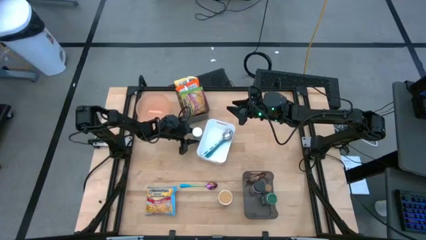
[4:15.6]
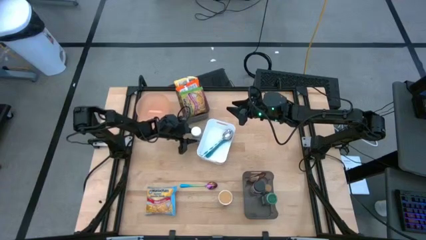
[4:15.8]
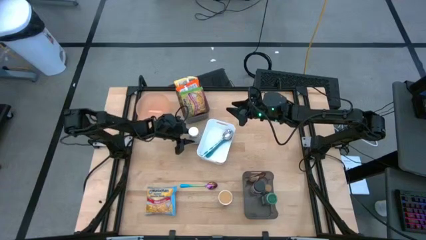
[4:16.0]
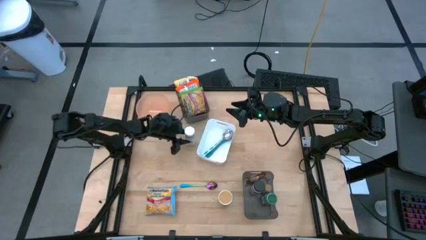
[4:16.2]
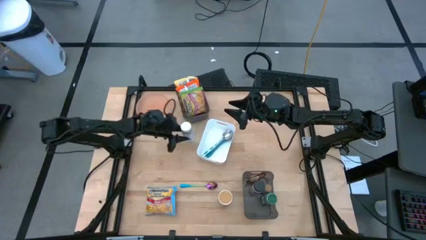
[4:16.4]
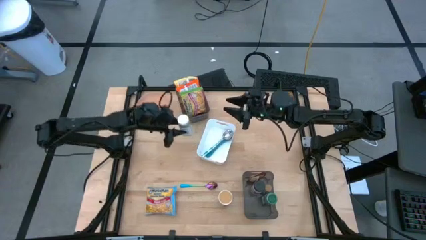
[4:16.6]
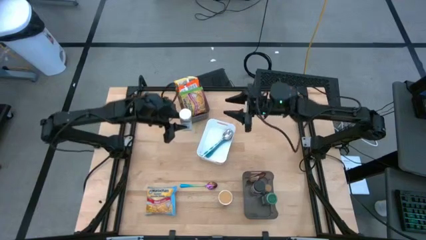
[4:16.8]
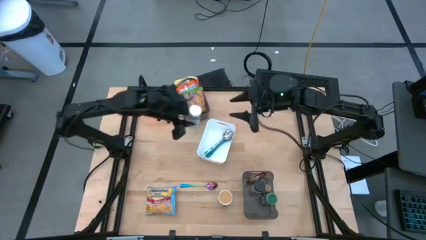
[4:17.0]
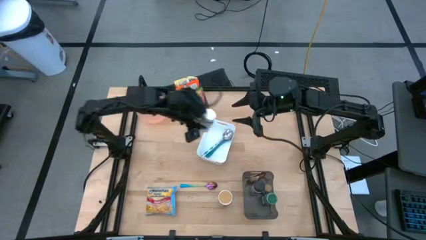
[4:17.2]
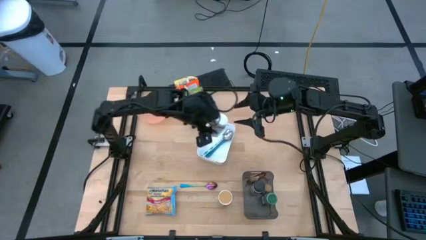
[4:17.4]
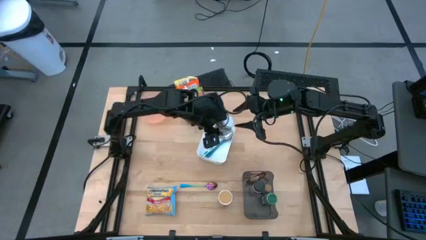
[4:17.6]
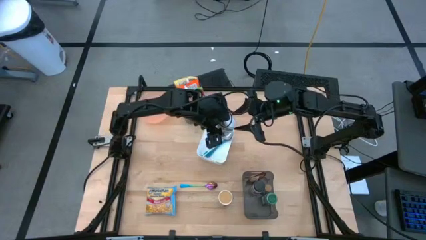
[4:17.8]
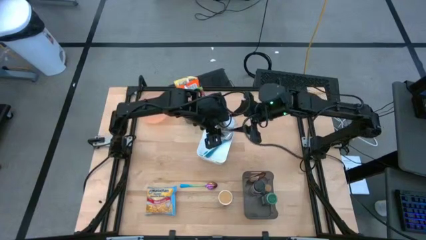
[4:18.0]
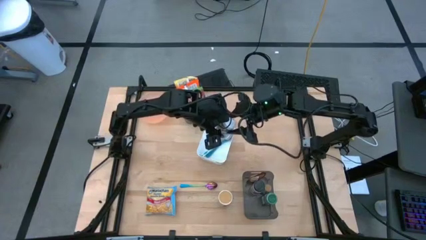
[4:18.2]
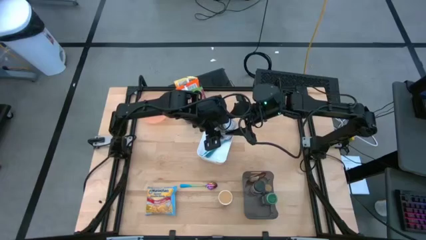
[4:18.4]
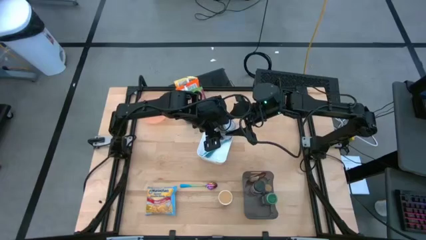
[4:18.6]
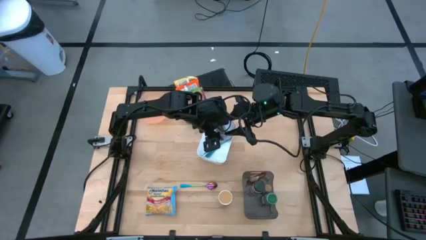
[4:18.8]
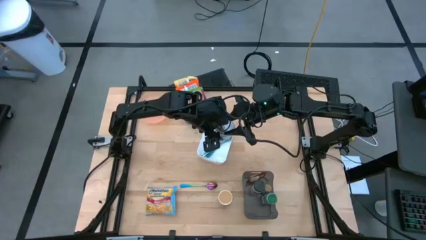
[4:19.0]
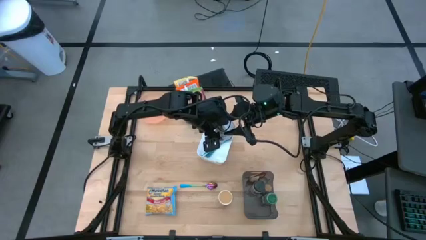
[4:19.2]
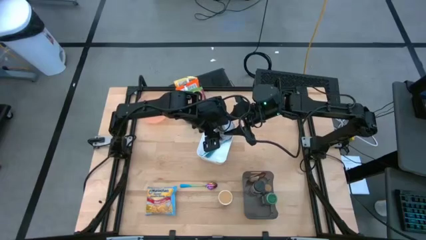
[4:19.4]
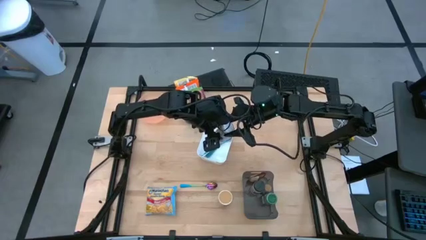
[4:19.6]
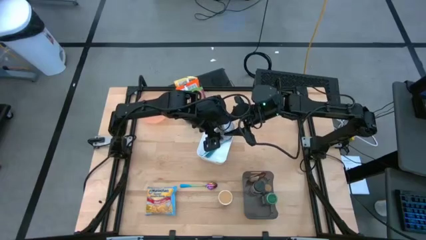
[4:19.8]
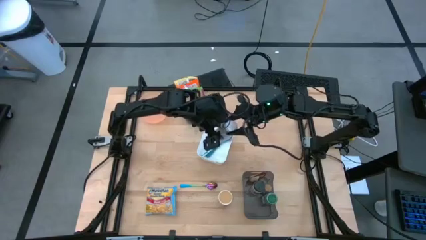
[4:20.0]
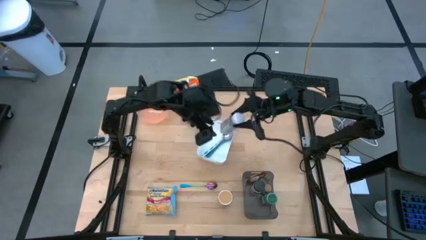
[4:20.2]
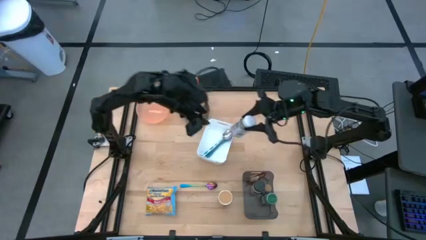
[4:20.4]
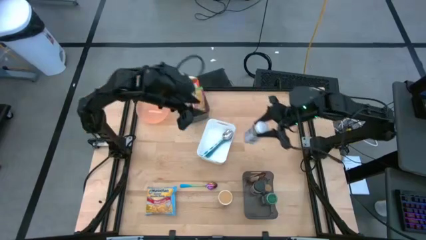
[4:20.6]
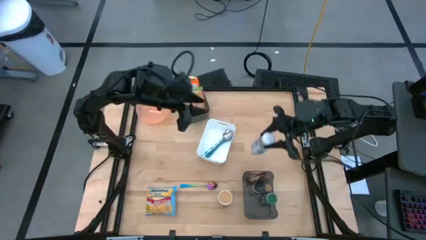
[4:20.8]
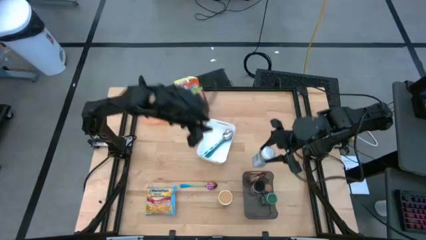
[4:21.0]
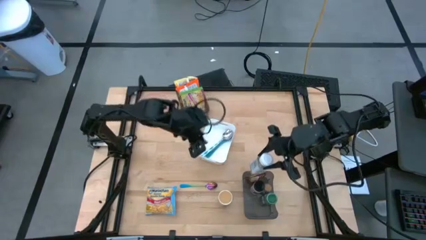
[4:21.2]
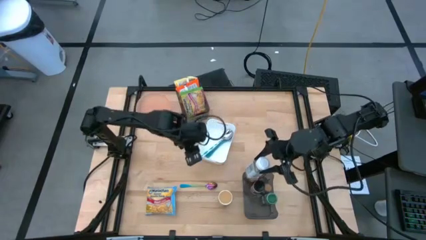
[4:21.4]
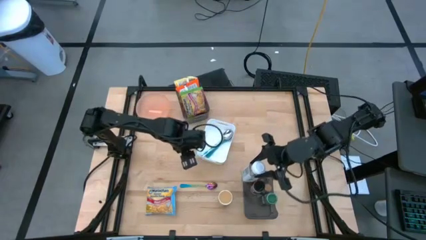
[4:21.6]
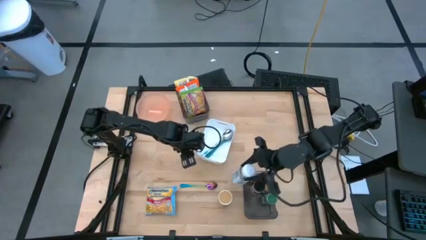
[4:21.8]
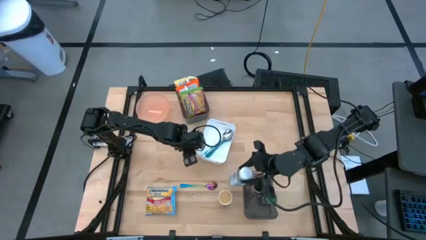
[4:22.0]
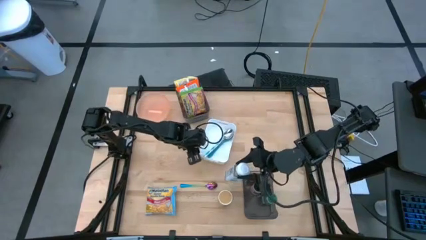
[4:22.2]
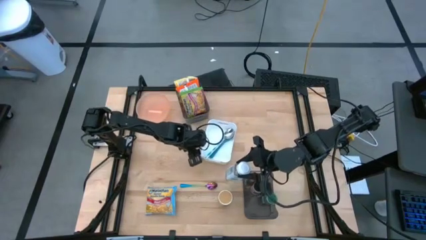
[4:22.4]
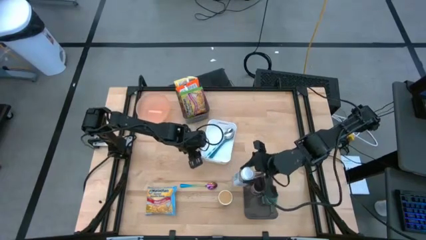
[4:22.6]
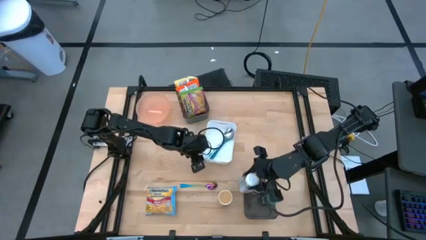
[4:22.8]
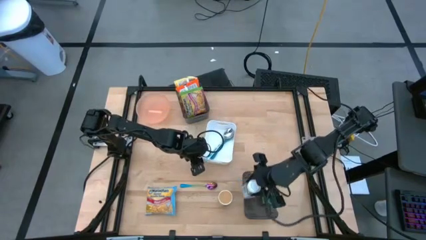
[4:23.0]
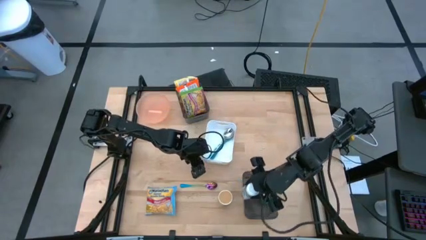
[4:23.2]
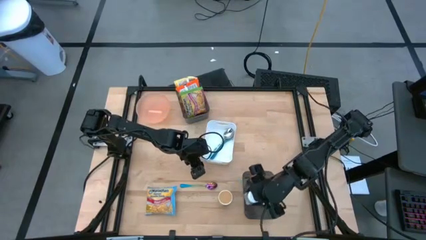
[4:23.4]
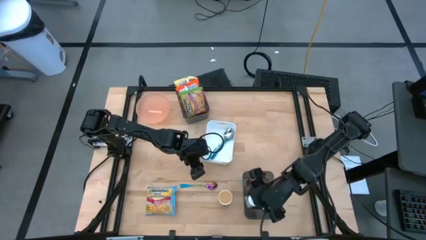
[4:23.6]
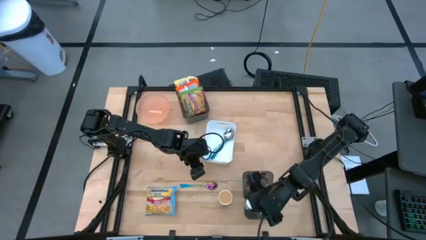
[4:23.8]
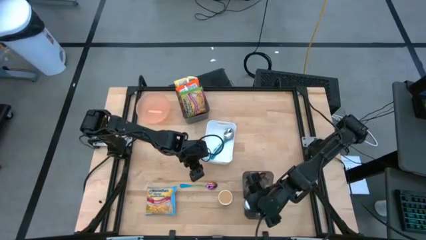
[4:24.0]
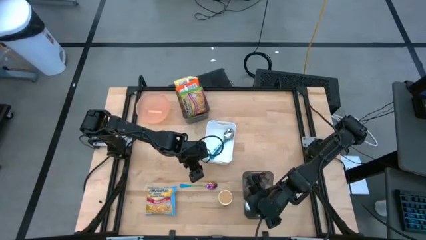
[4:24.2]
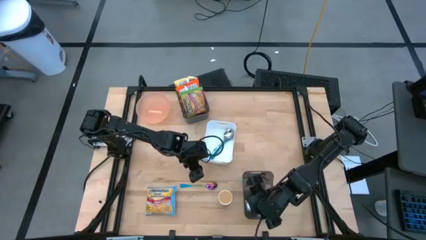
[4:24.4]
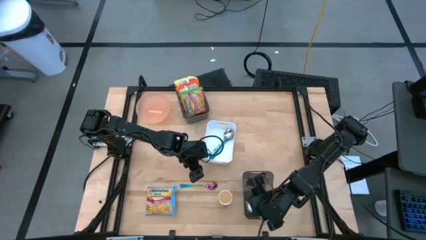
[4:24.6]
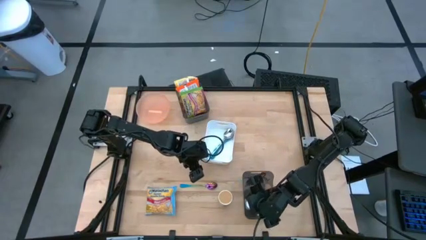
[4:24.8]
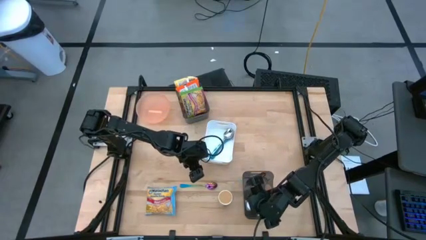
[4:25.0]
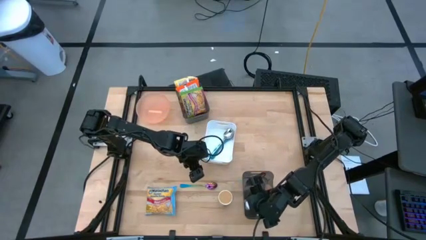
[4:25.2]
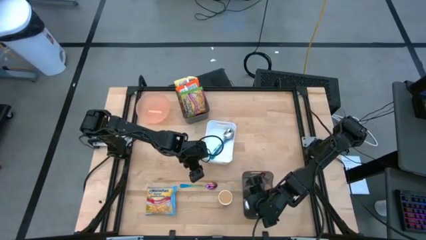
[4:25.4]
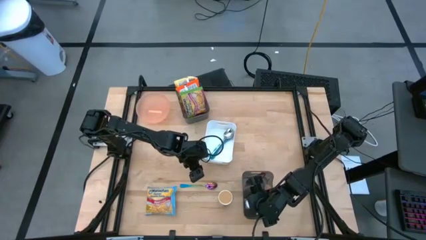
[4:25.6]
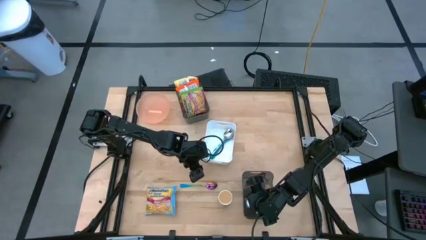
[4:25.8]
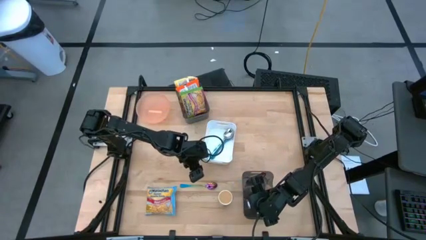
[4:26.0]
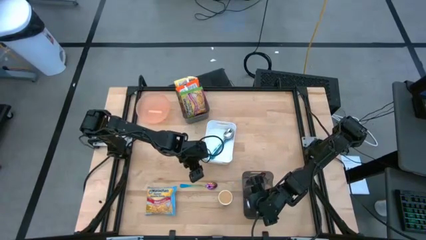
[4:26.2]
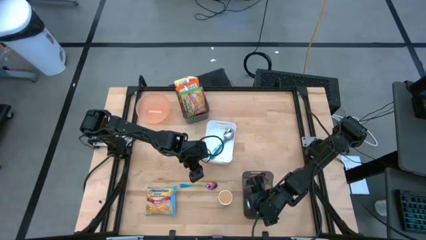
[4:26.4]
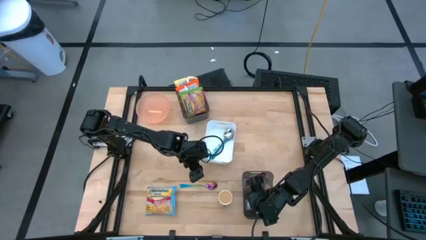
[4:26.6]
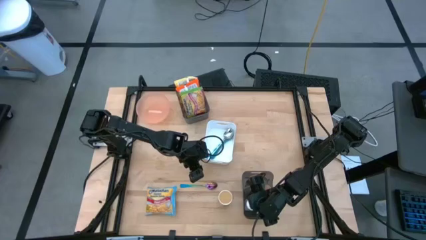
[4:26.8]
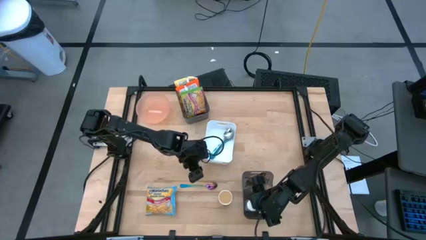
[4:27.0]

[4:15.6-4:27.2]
Task: Pick & Place Food Item
Put the white seasoning bottle into the bottom black bin

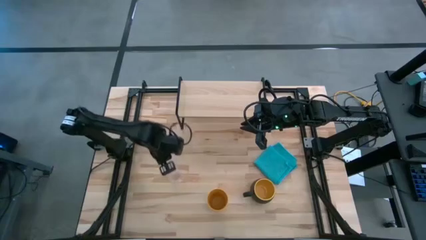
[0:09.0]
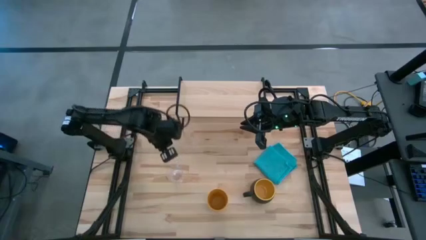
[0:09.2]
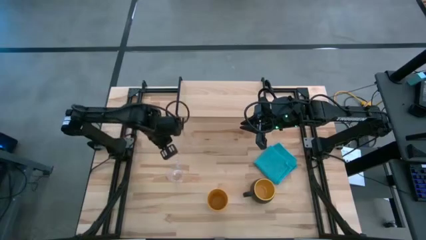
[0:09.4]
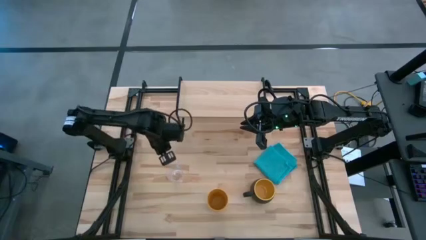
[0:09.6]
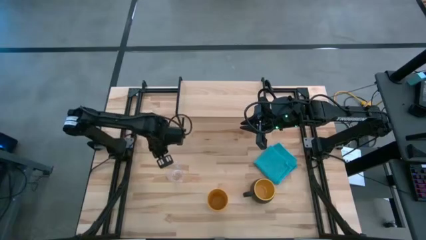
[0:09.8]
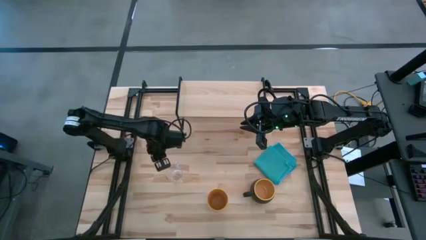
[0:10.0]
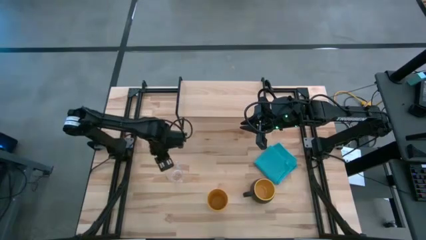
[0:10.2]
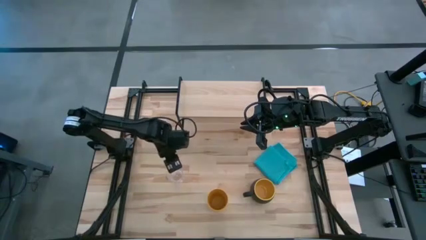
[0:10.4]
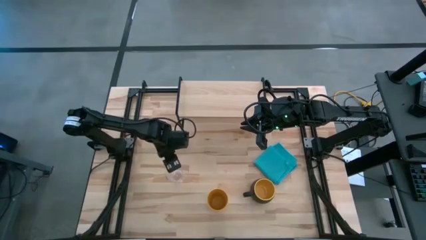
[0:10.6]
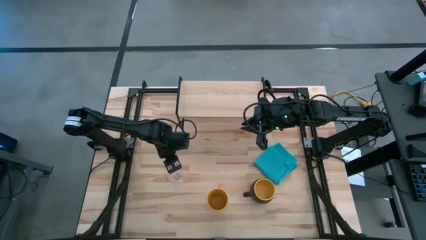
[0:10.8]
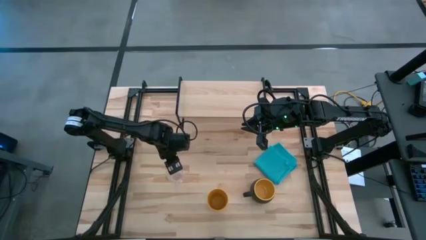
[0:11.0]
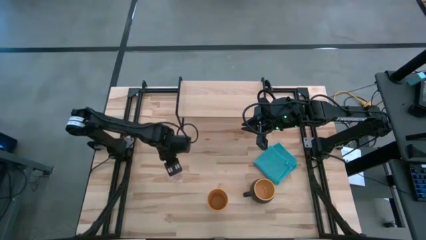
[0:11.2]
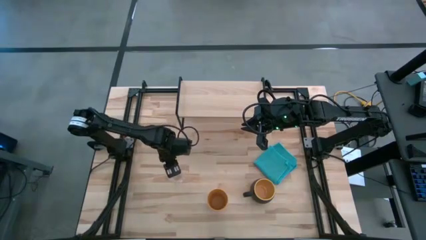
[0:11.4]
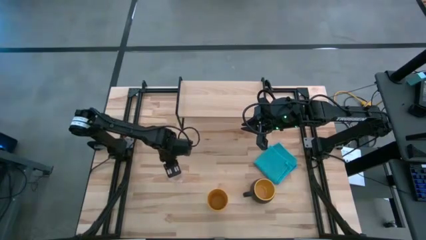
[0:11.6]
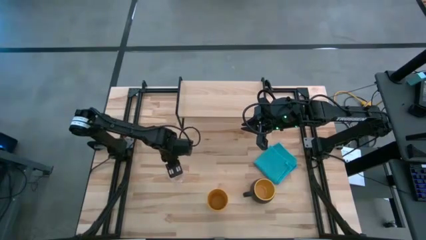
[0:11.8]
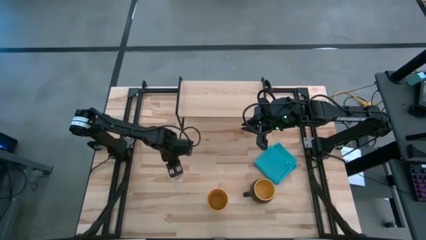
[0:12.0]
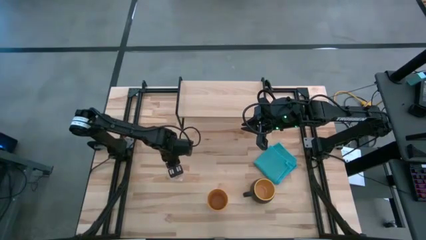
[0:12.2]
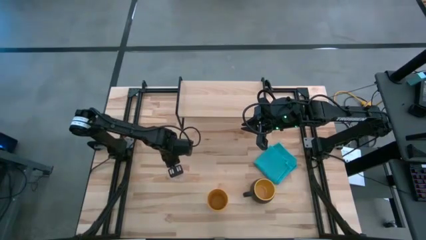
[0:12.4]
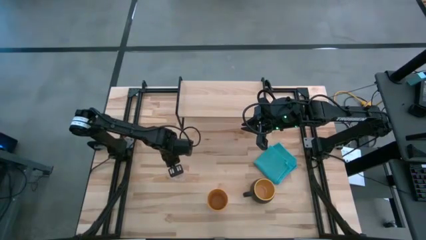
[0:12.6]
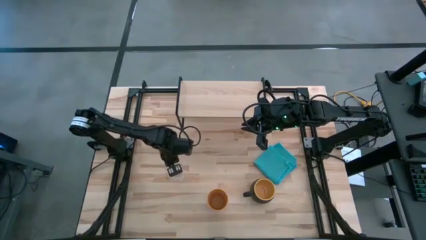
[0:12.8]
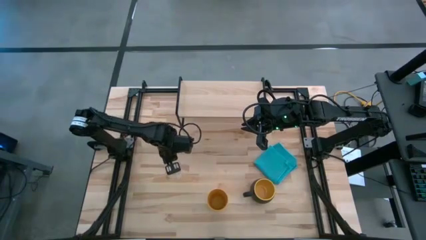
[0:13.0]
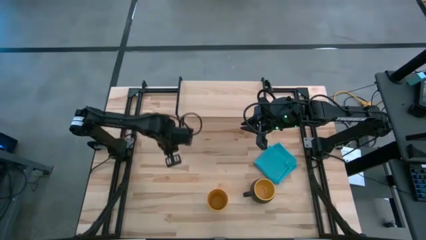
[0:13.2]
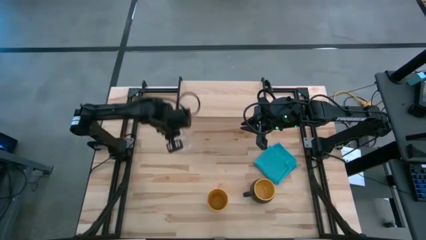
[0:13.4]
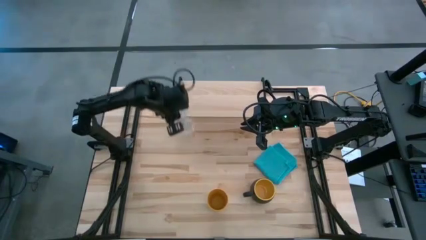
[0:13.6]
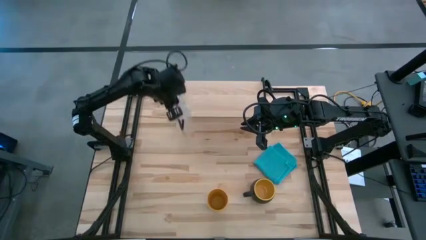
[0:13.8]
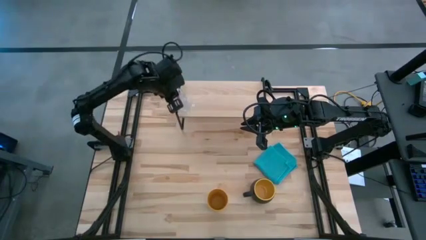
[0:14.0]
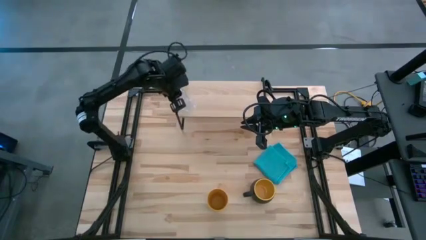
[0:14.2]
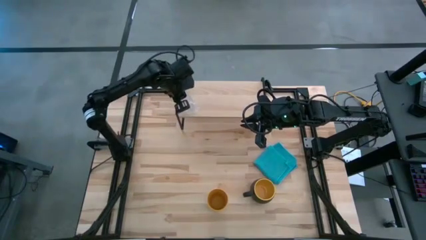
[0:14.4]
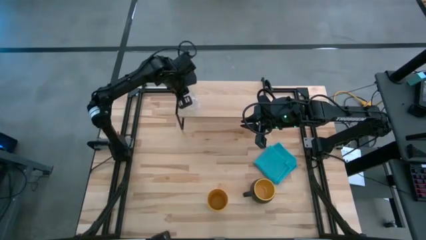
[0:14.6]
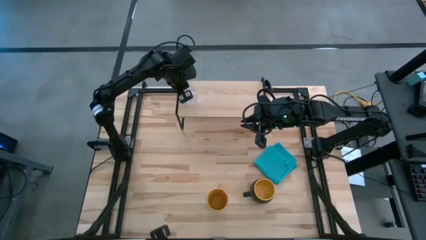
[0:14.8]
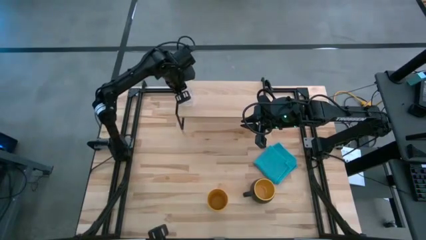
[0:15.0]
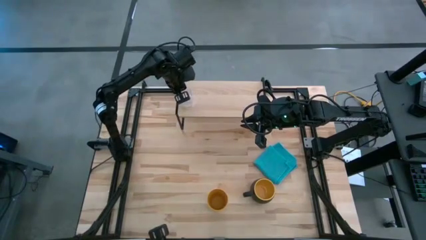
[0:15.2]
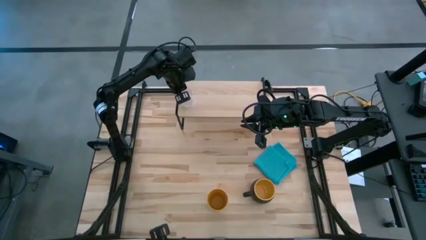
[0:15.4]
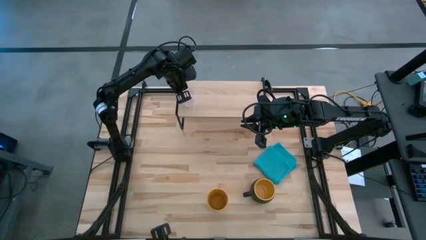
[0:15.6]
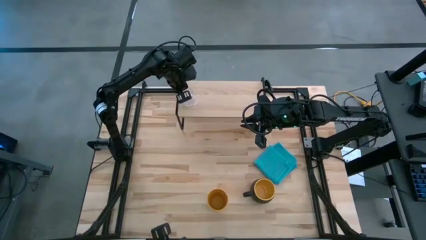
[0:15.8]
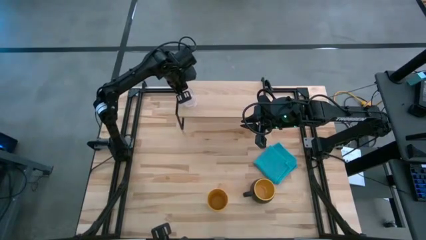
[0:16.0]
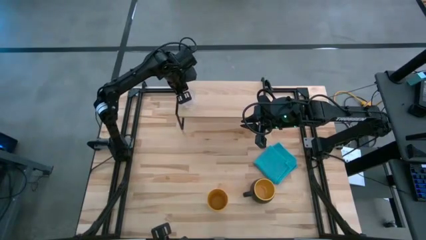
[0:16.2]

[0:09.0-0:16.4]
Task: Stack small to large cups/mugs on shelf
Put the transparent glass mug on the shelf
